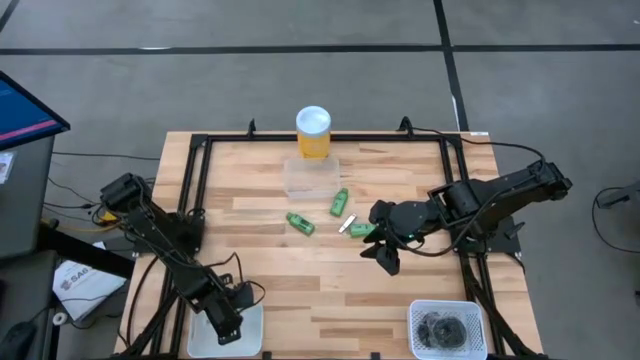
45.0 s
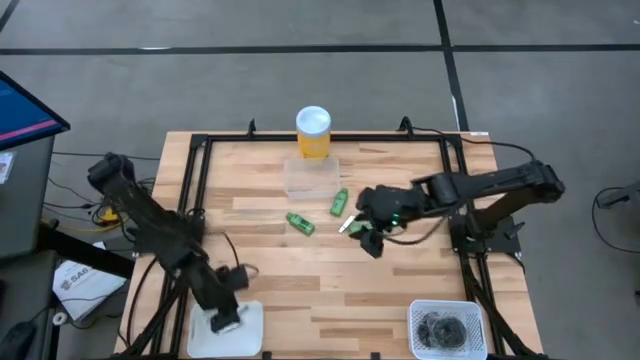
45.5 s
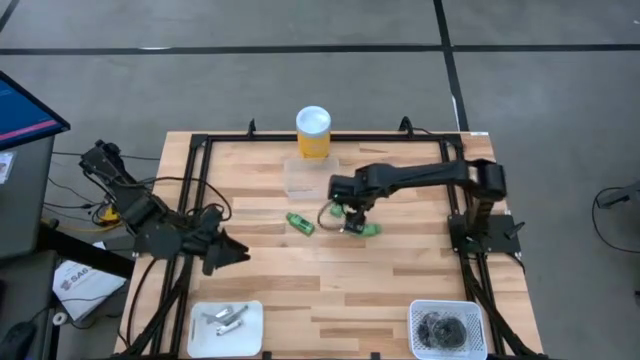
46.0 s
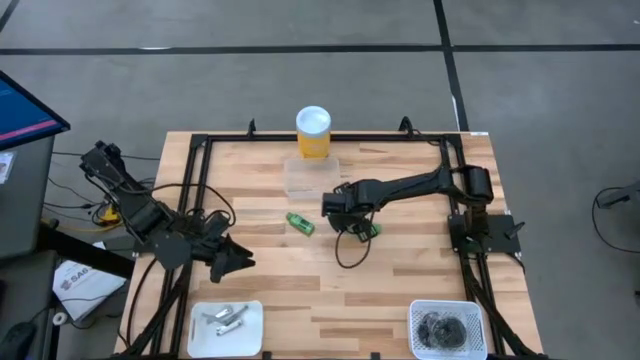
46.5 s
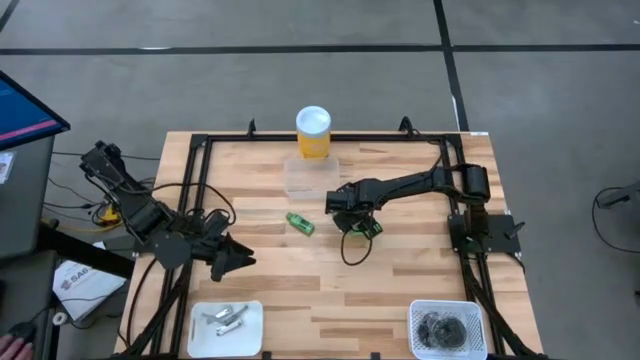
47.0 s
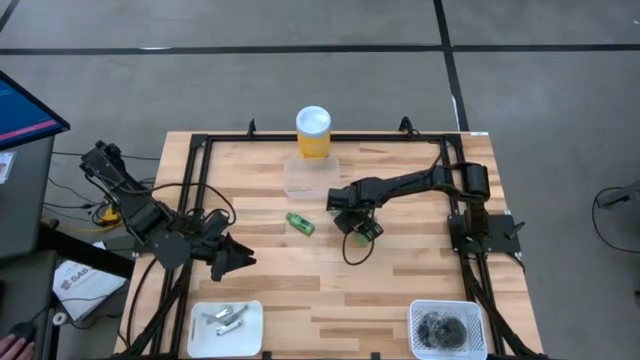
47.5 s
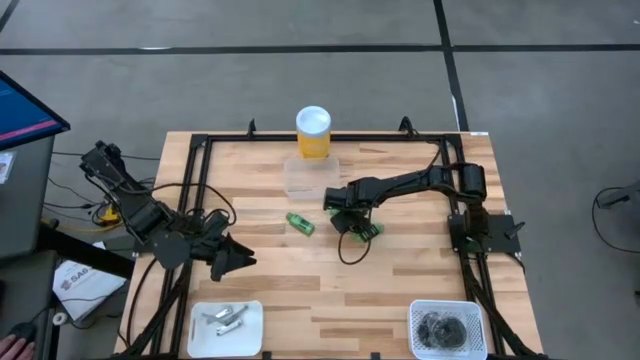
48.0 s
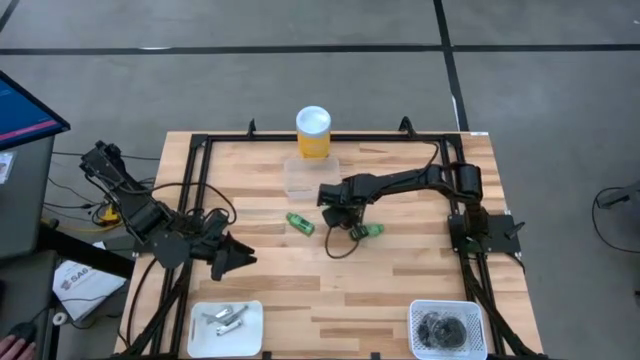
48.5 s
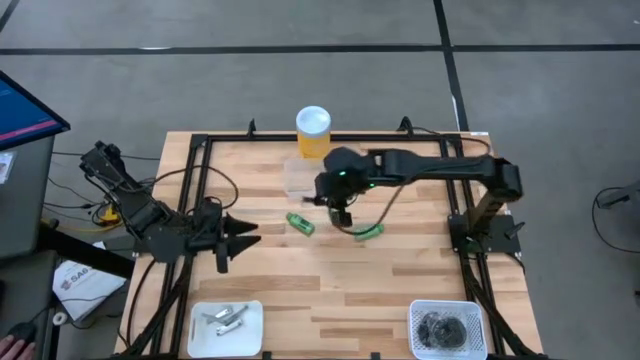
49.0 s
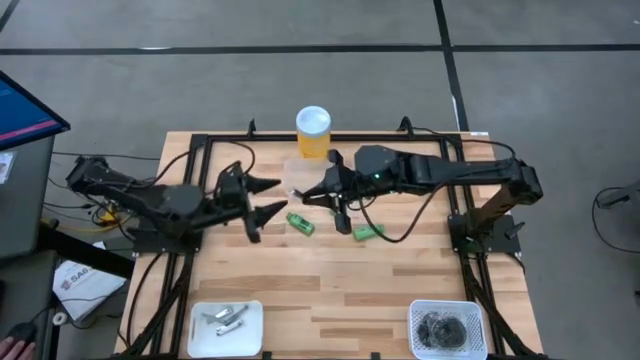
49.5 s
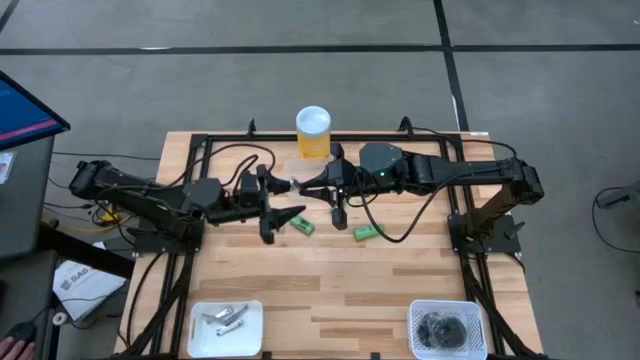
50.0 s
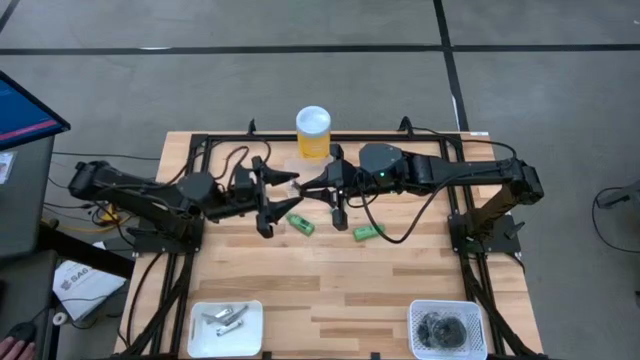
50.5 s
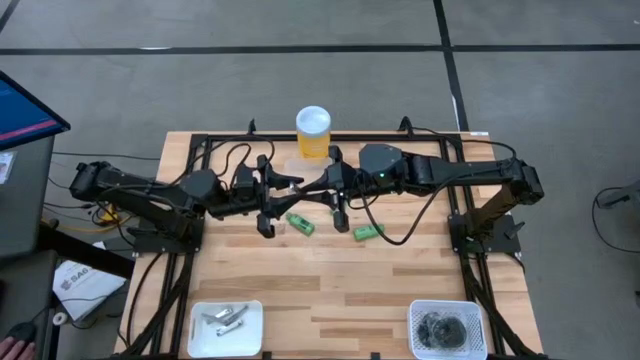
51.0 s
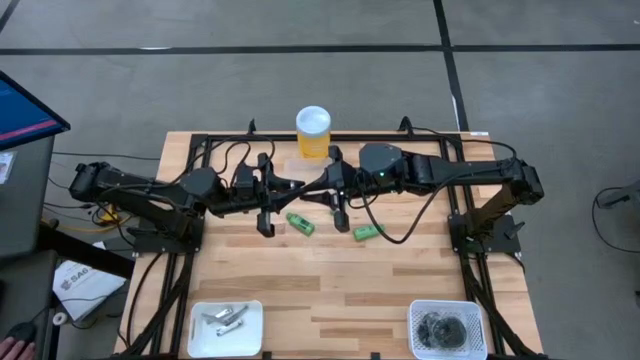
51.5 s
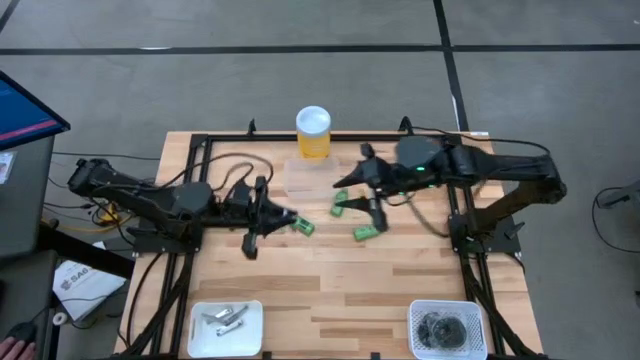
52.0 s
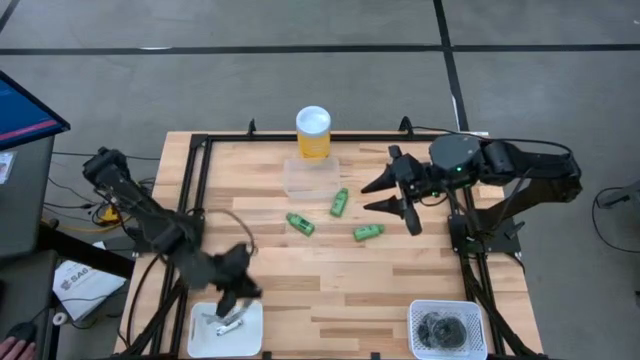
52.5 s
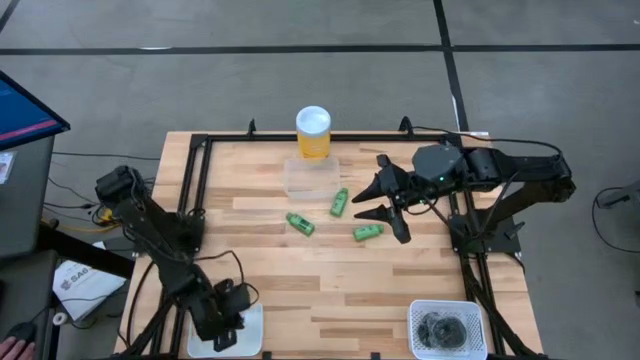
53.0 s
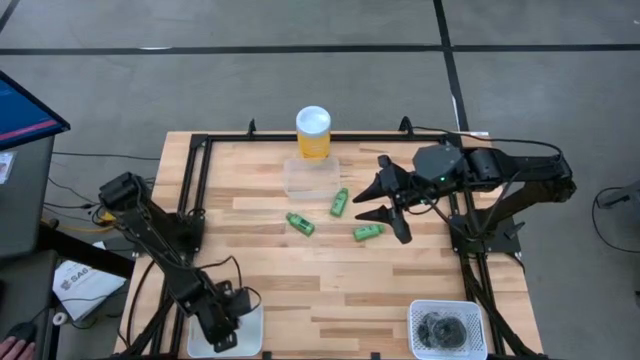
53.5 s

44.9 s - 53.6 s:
Task: Pick & Place Travel size toiletries
Put the silver nail cutter into the left white bin

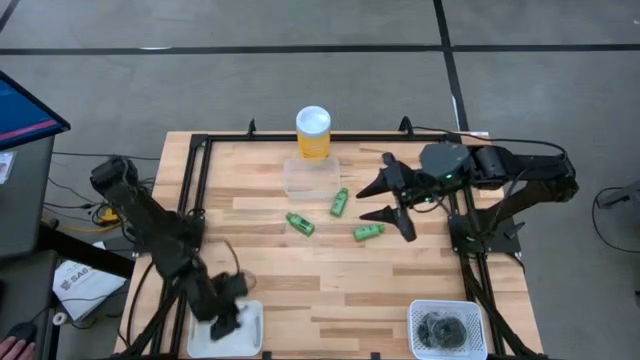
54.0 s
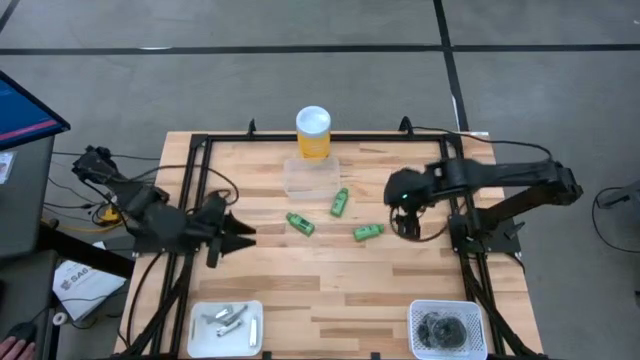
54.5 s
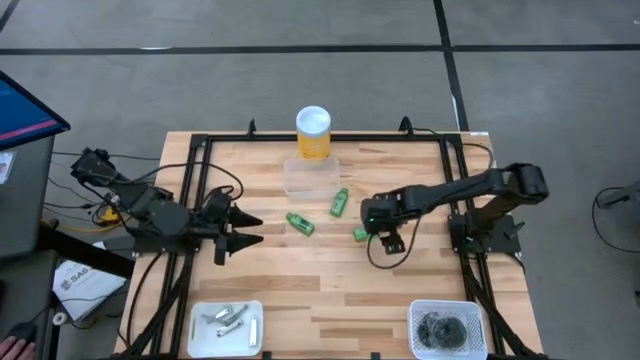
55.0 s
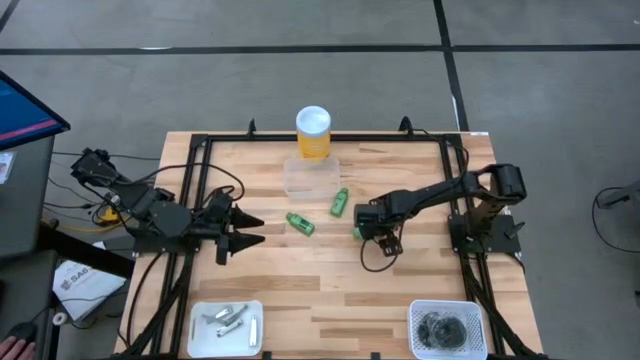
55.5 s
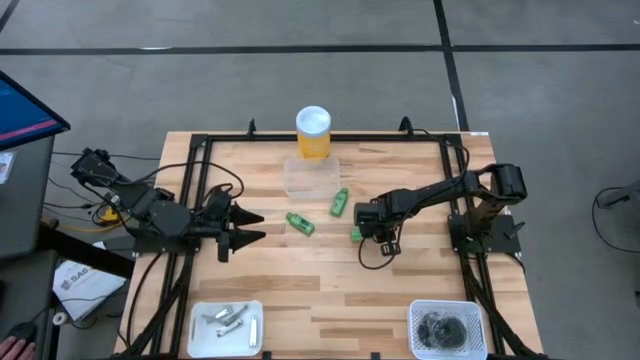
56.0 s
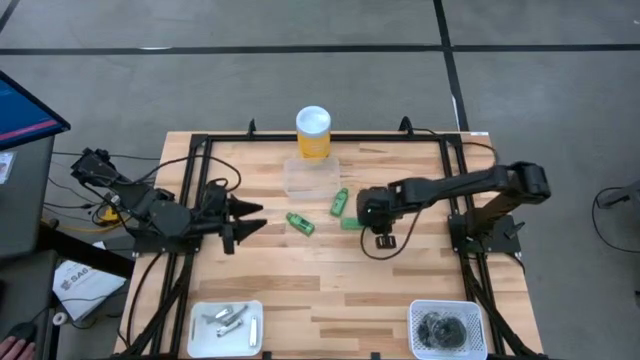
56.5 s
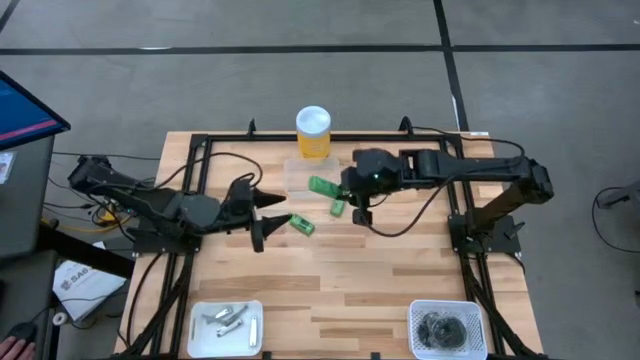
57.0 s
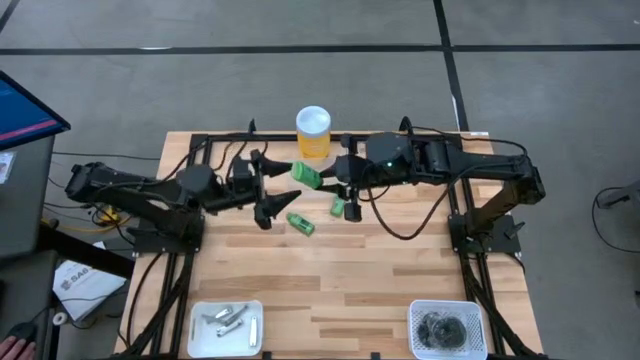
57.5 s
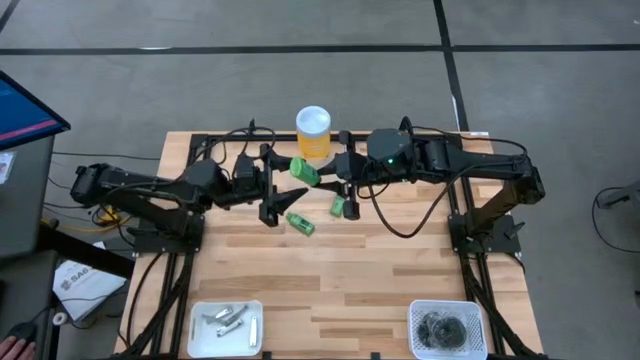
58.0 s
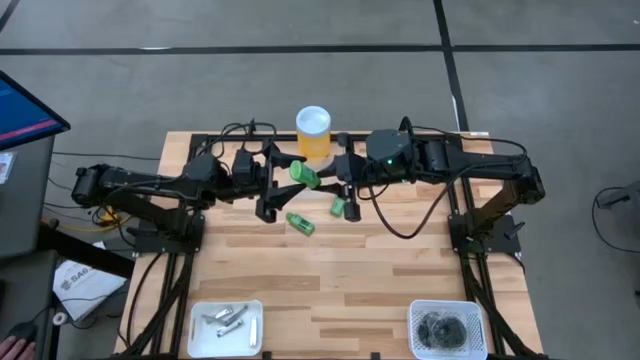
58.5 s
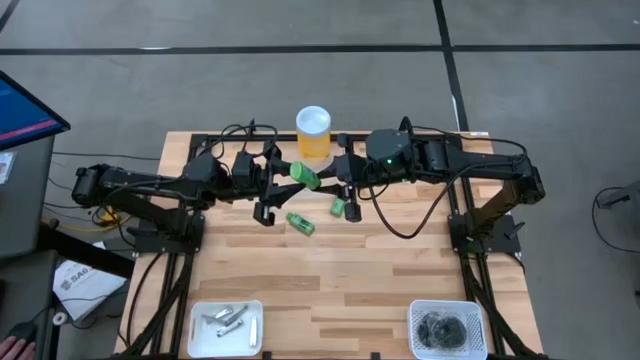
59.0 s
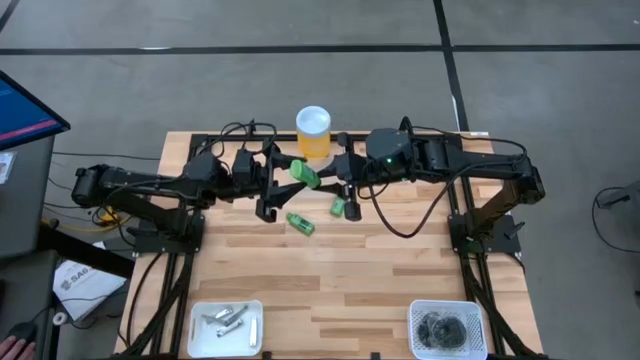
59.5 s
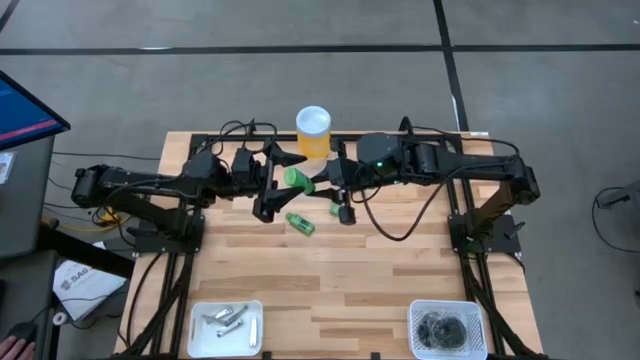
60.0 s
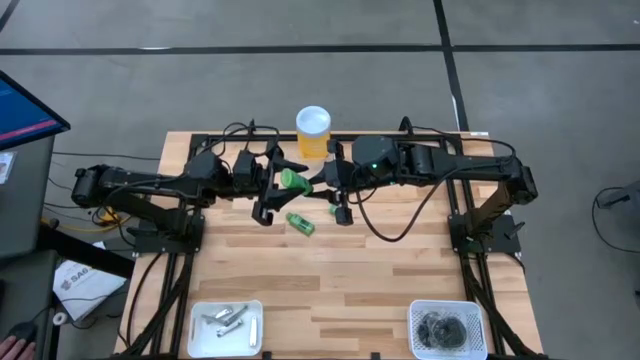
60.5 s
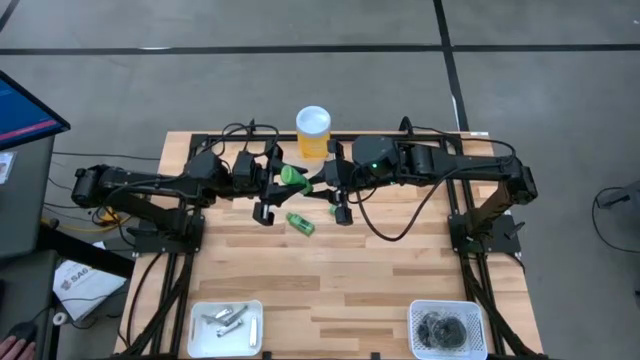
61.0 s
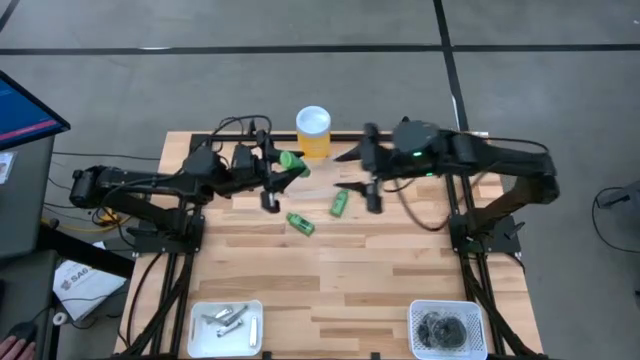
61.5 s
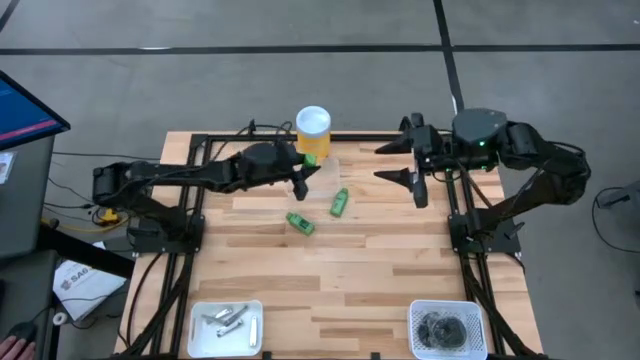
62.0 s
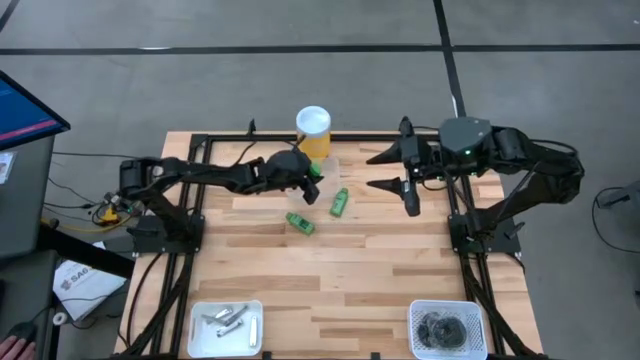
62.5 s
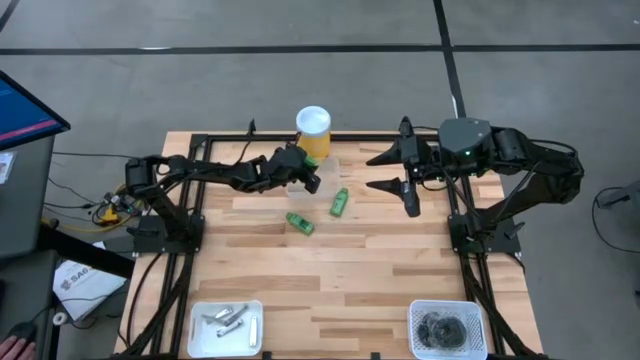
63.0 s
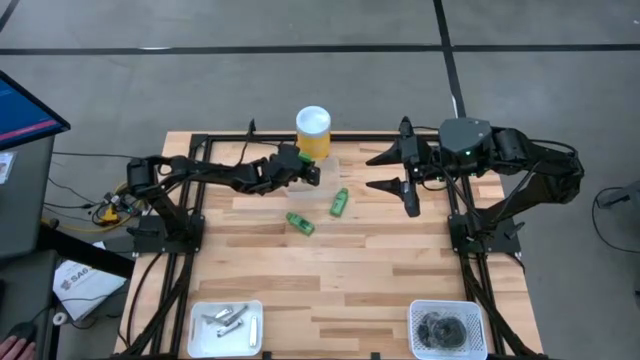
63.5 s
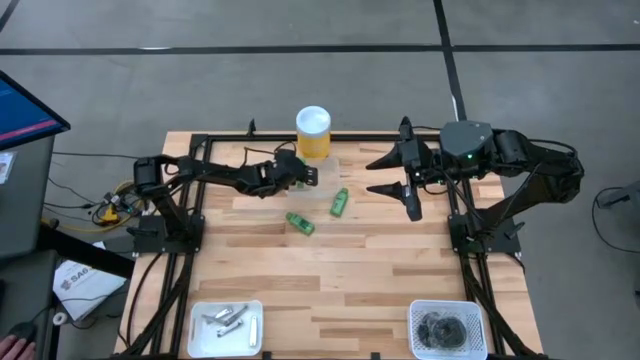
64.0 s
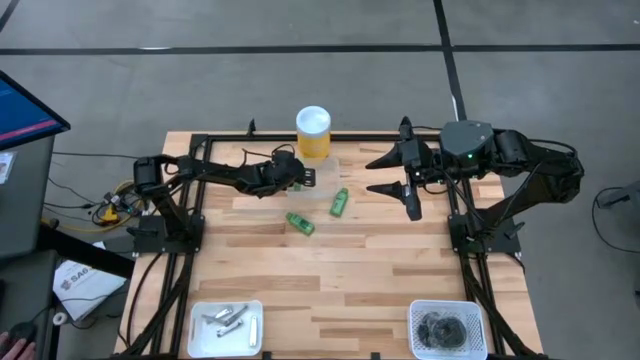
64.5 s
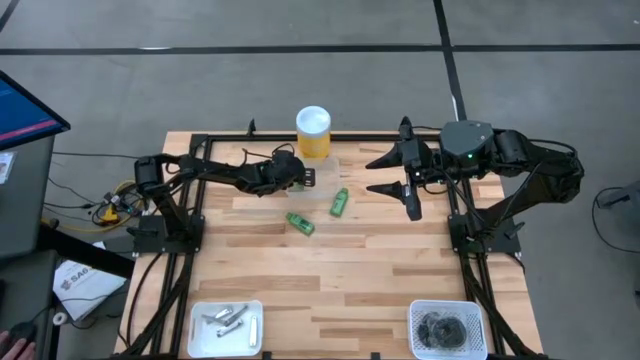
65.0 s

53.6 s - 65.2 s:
Put the bottom right green shampoo into the transparent bin

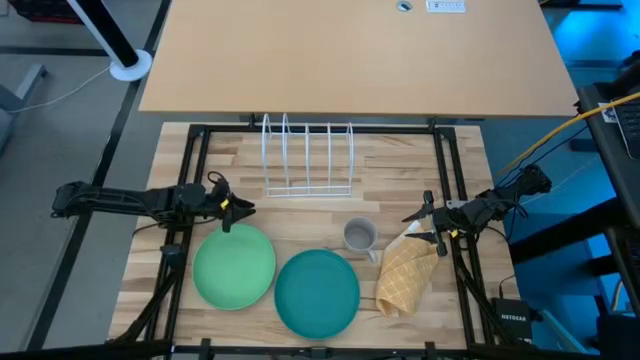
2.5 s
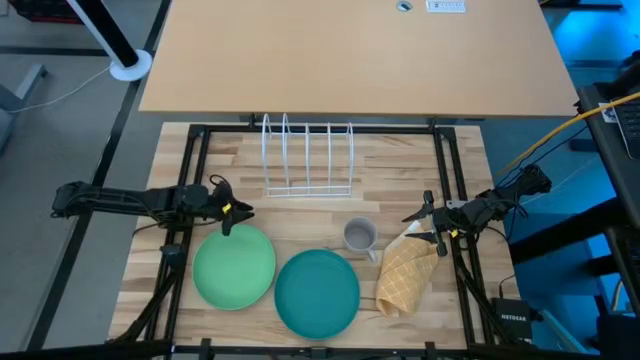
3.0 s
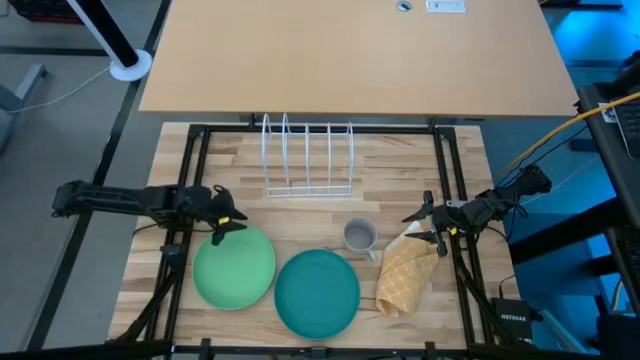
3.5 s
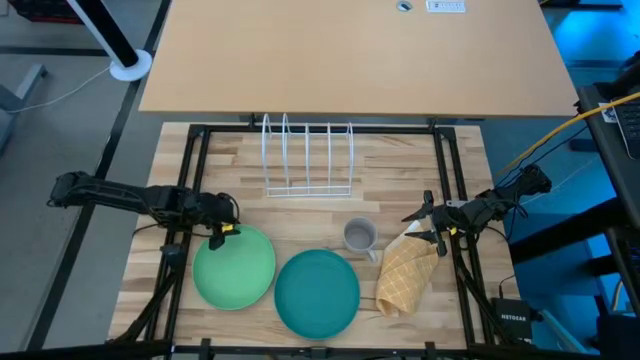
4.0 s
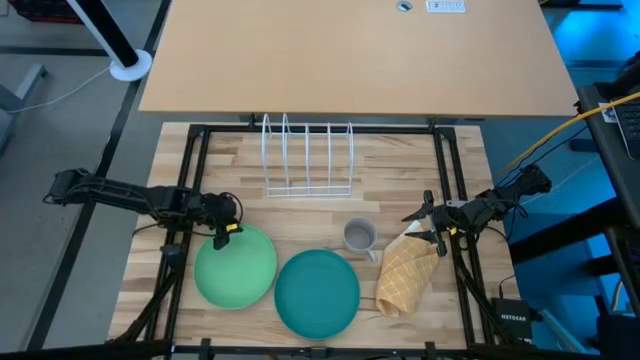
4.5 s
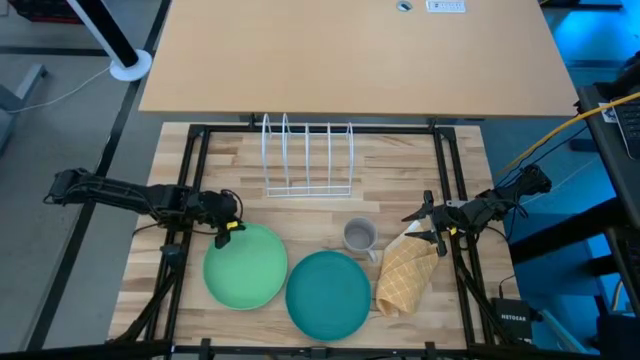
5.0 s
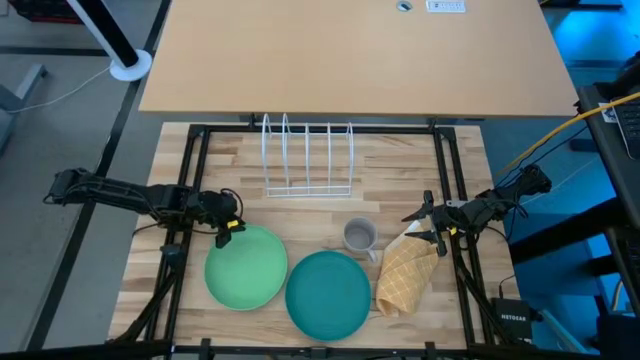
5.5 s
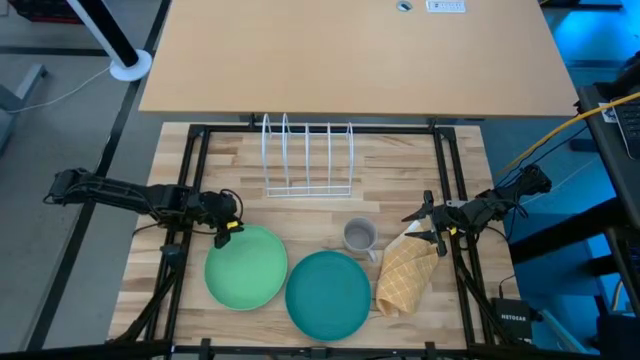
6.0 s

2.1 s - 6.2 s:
Task: Sort dishes
Put the left green plate into the white dish rack
